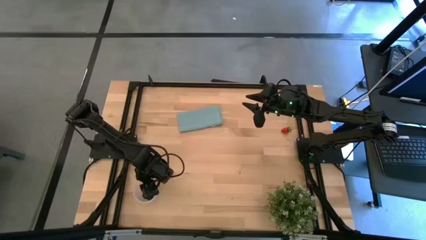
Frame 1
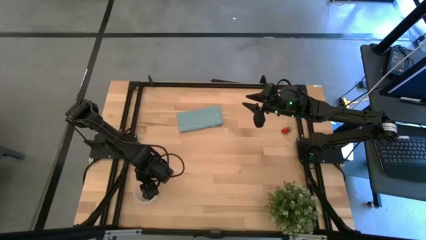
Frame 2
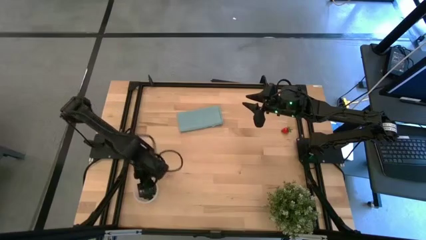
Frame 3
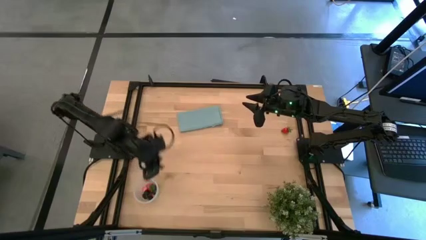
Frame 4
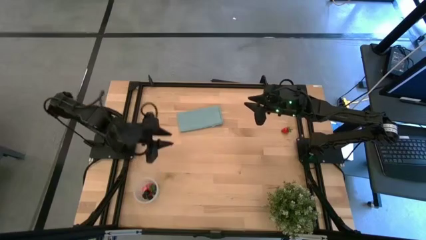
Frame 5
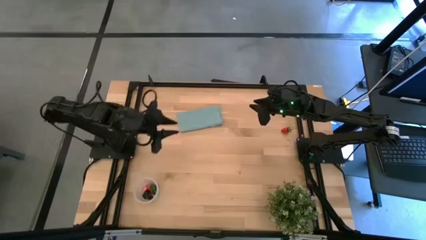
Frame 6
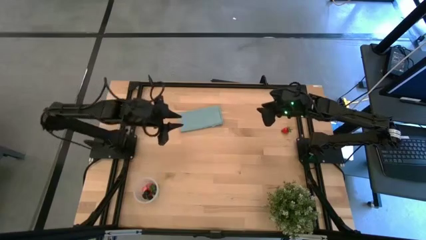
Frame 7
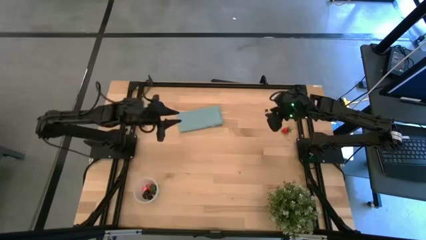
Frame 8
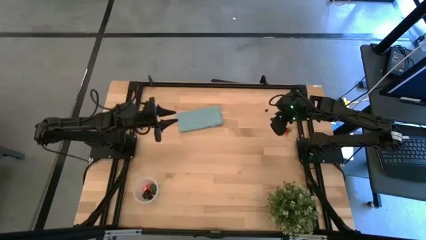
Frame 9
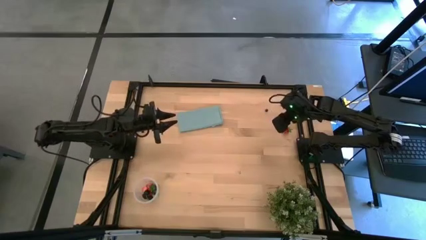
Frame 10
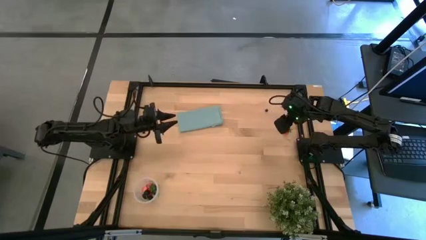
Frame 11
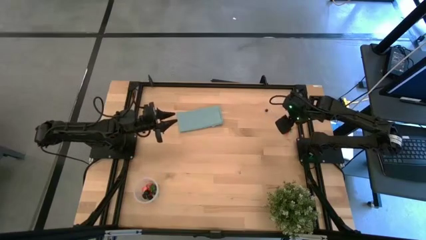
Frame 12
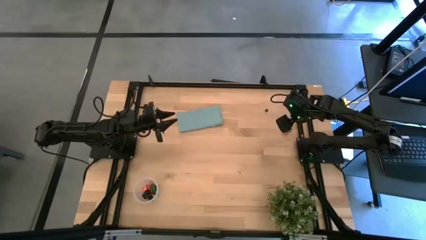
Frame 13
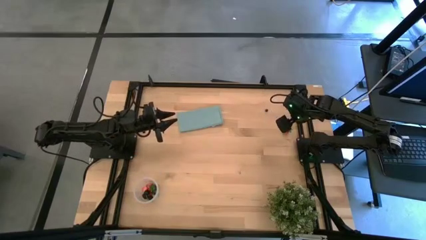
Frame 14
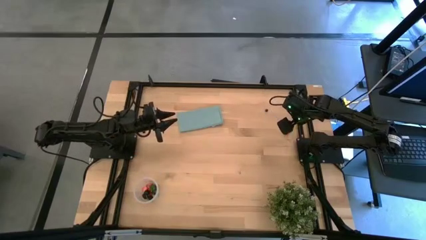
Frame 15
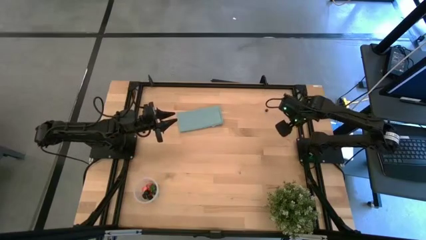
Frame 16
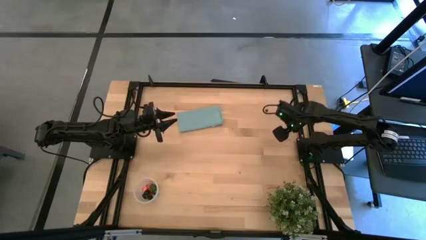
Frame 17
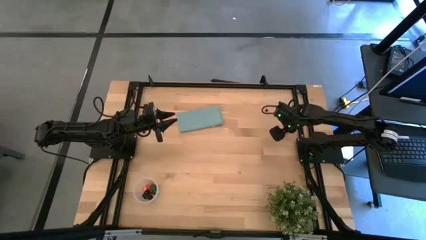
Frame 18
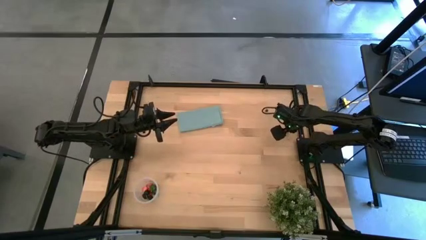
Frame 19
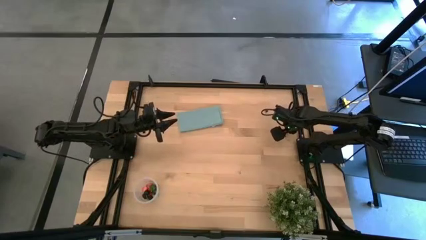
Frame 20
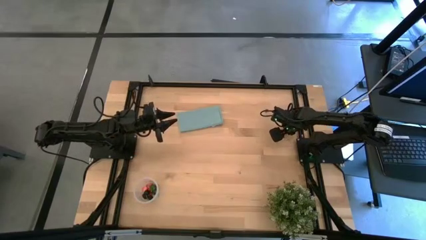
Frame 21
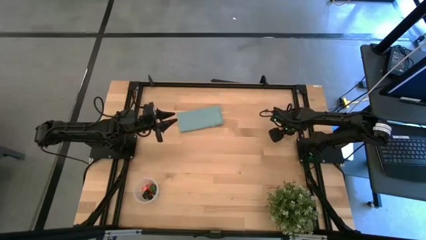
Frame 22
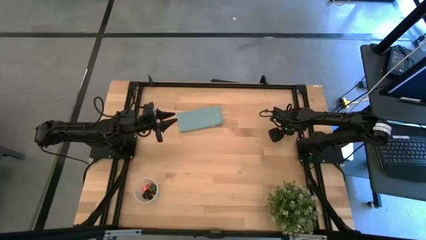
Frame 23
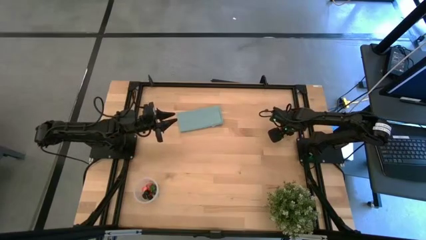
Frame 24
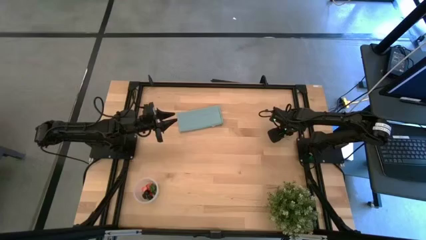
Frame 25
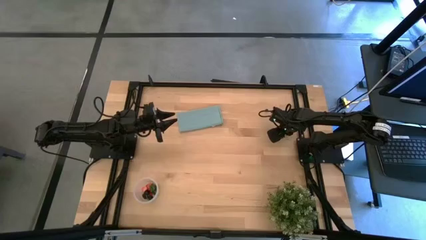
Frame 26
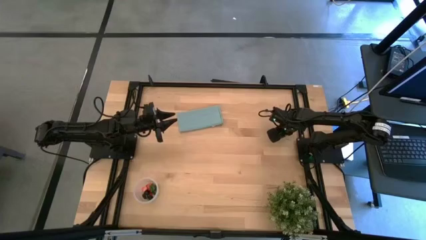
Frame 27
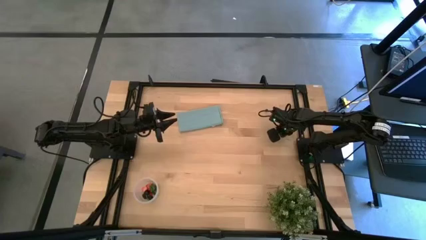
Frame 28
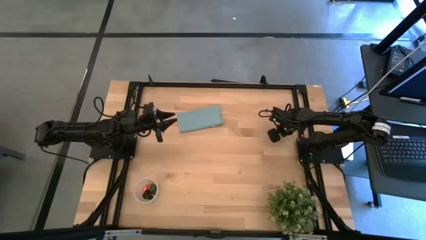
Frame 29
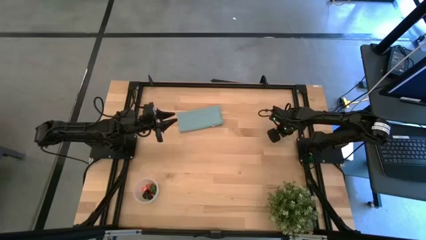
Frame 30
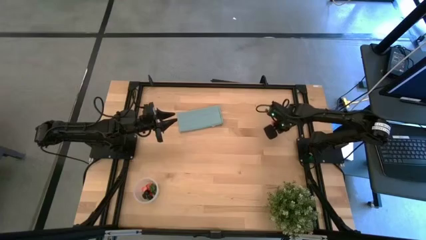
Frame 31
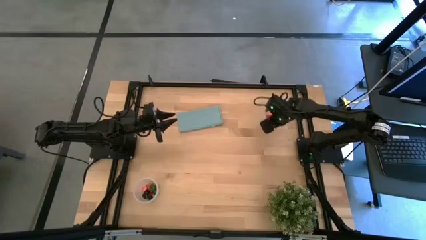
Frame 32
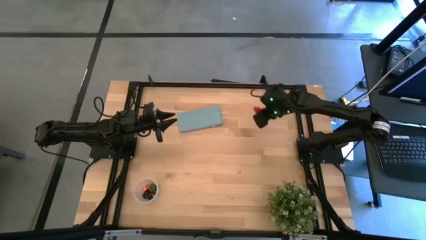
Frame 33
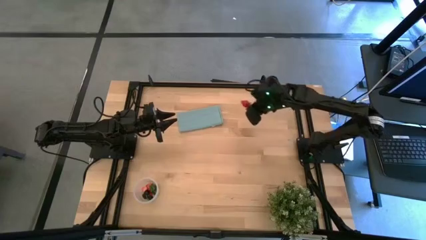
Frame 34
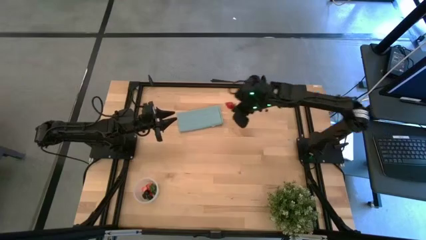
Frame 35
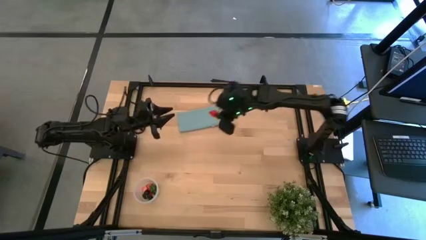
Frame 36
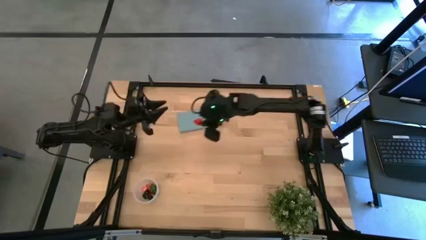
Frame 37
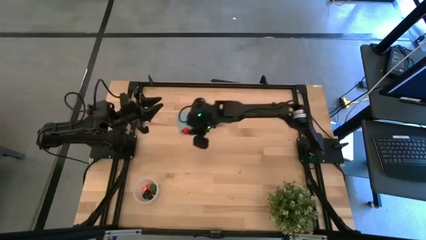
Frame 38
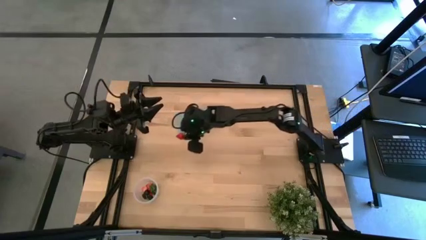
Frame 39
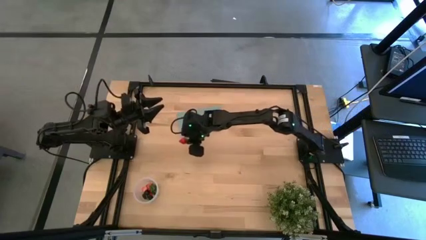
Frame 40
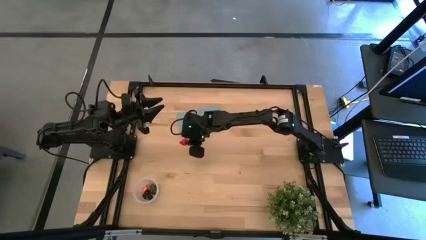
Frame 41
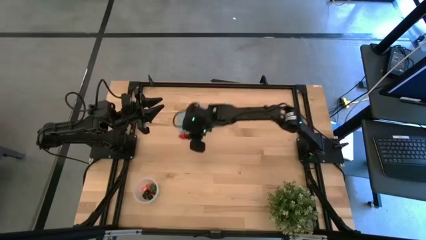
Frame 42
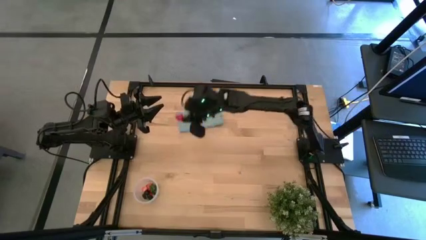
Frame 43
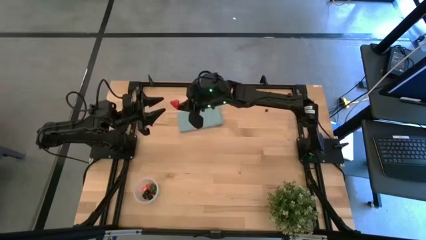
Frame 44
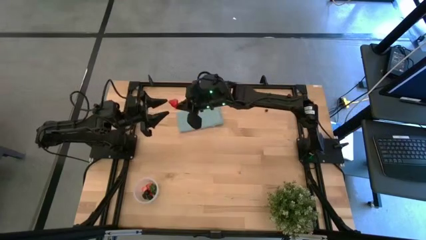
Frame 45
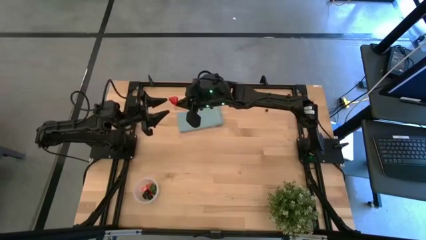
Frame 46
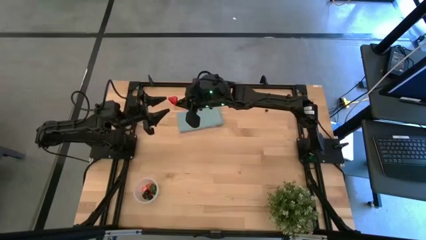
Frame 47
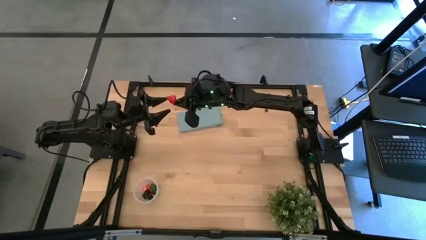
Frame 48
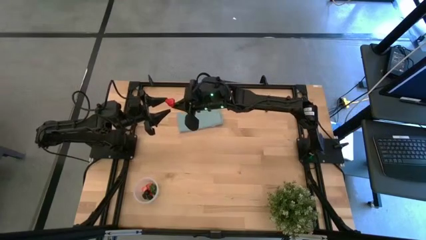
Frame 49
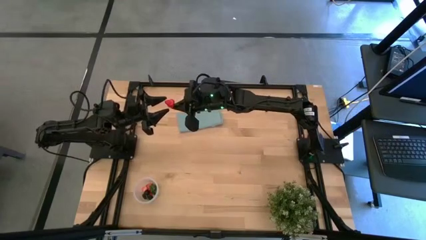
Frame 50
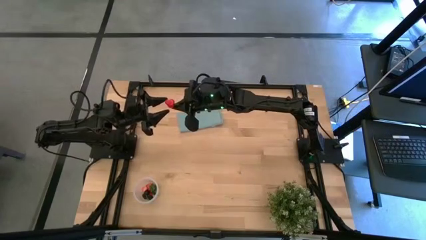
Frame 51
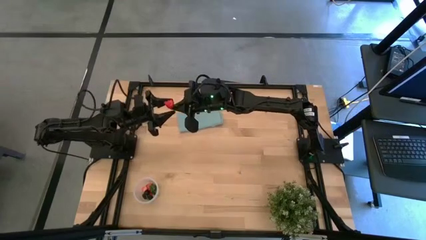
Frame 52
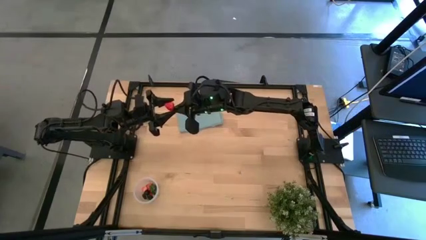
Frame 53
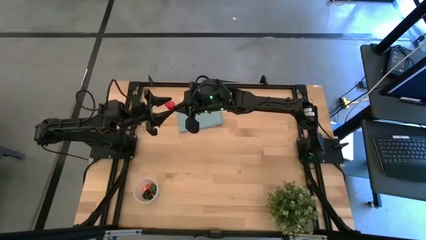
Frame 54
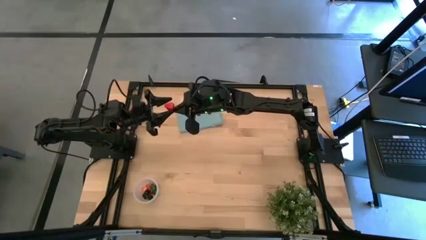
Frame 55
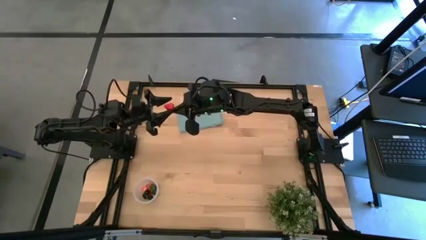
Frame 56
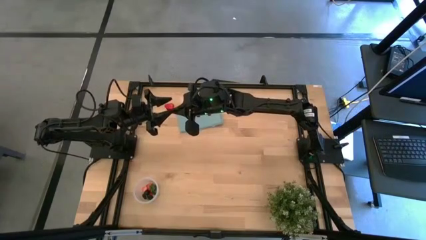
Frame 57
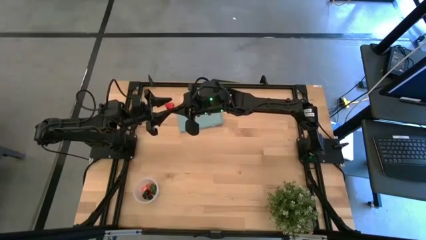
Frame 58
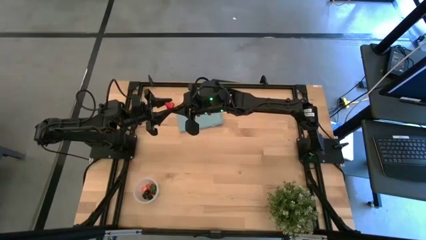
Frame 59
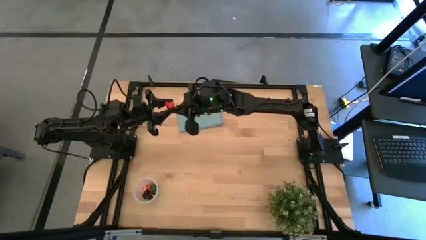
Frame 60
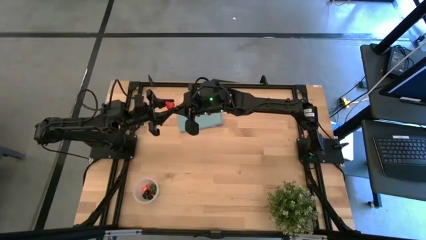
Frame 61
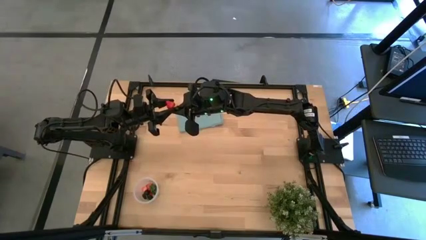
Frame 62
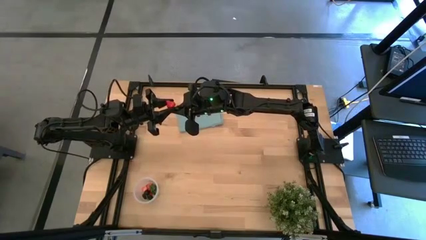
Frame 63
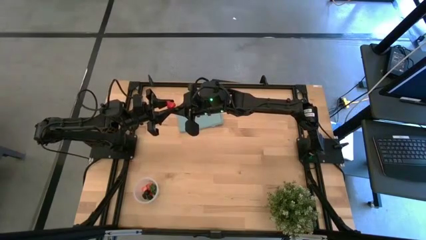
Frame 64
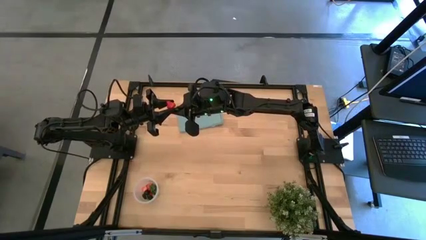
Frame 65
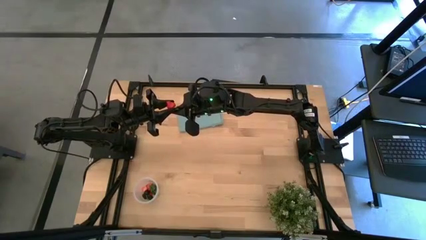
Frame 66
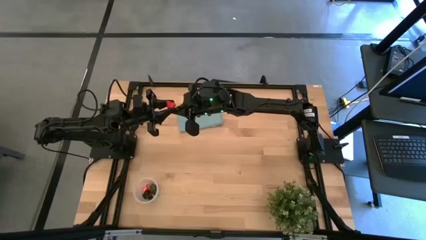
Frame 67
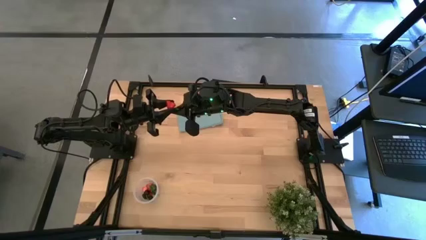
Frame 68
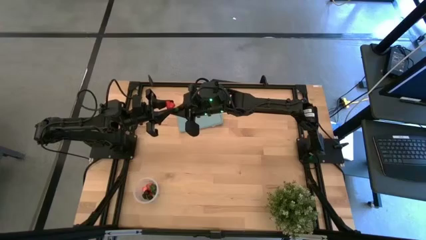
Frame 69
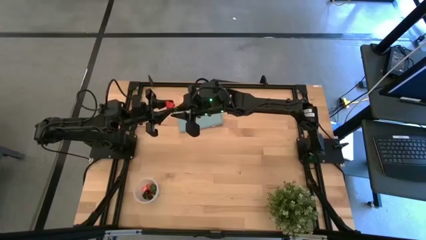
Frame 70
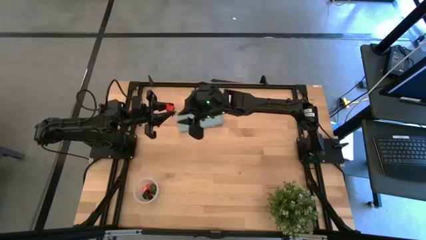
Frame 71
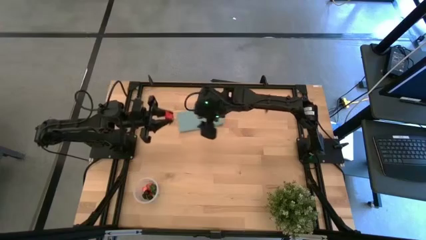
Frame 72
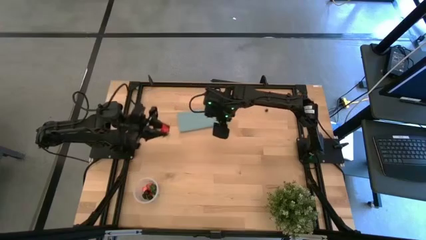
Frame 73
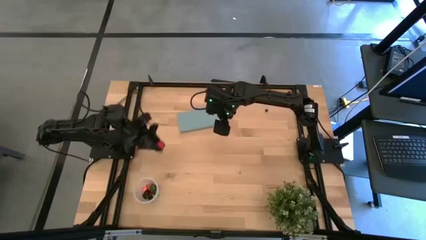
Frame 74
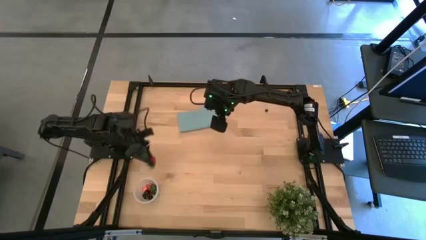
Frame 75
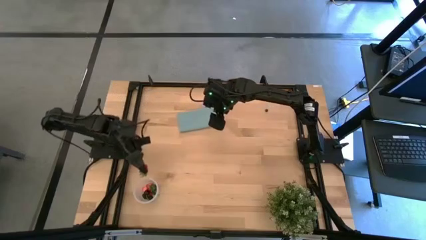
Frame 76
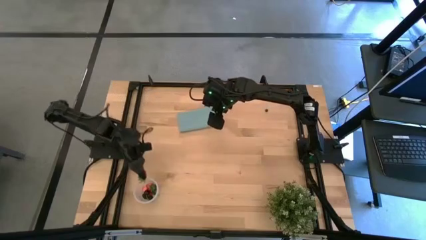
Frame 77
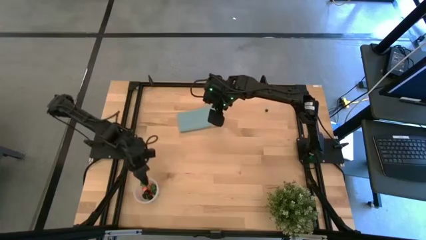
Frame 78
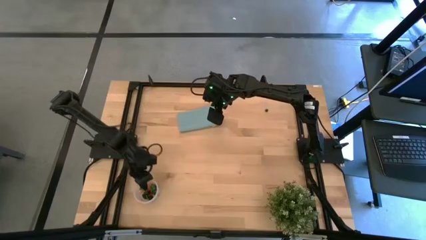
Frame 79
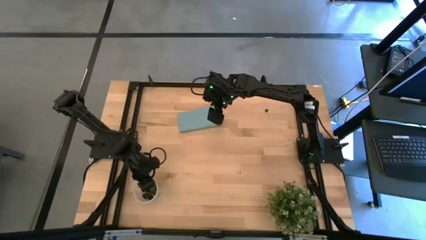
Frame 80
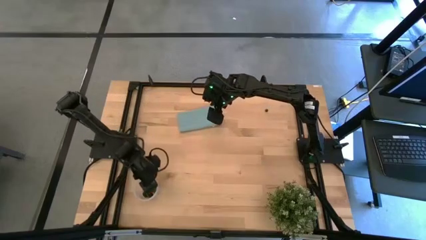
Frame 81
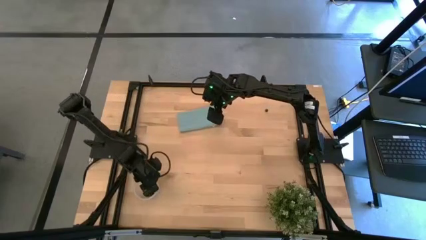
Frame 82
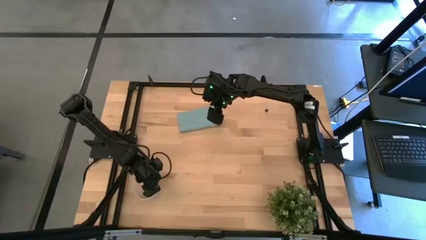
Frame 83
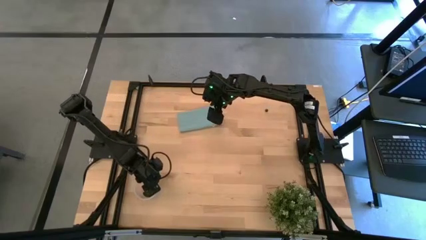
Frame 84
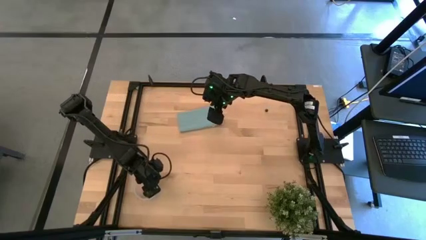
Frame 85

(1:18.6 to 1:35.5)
Task: Pick and placing Produce into tupperware
Put the strawberry into the transparent container
